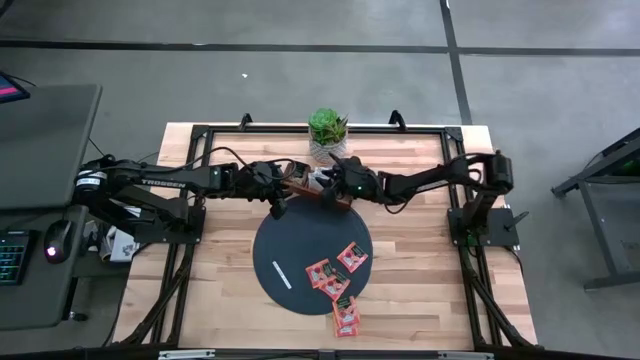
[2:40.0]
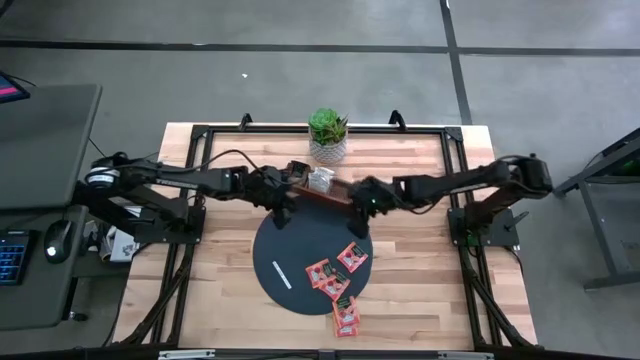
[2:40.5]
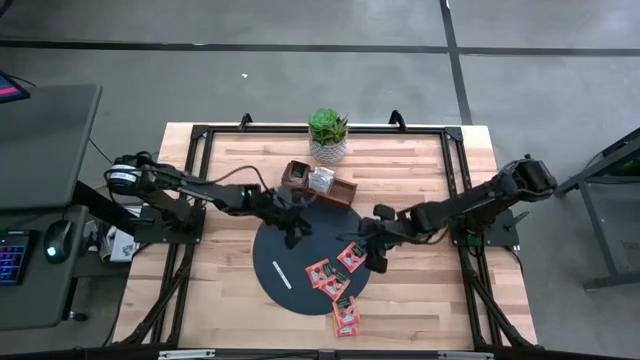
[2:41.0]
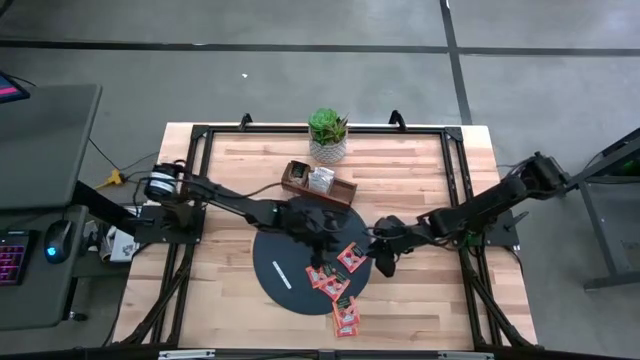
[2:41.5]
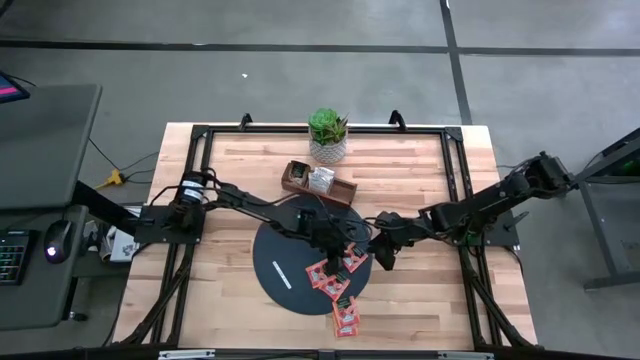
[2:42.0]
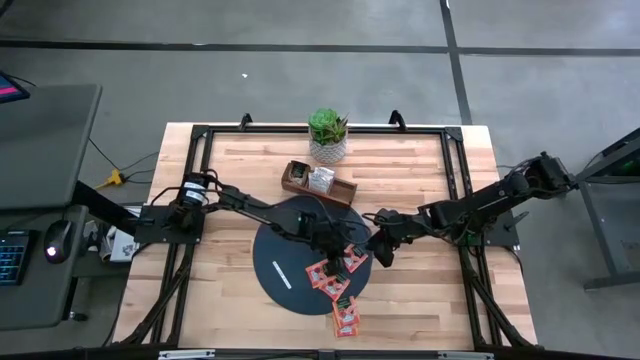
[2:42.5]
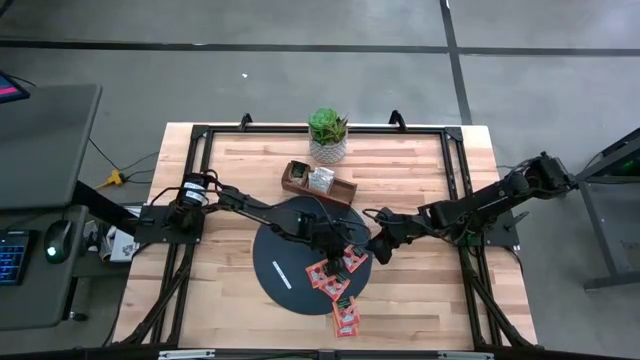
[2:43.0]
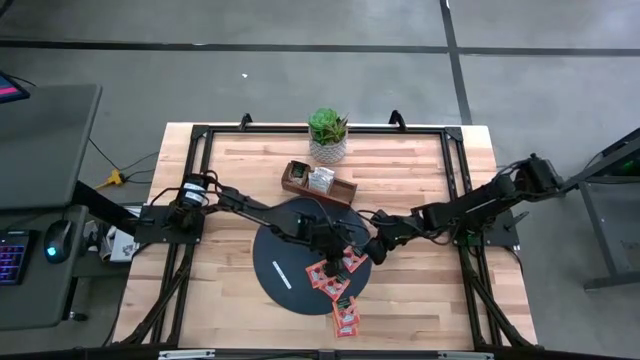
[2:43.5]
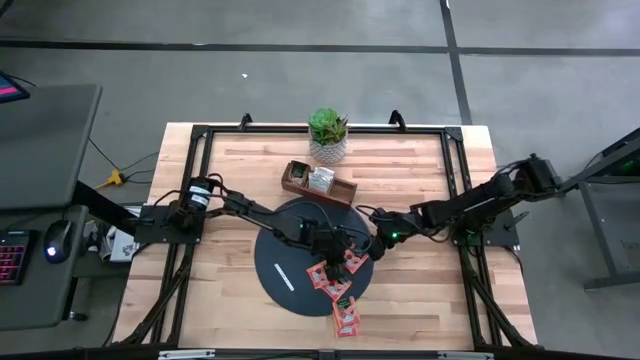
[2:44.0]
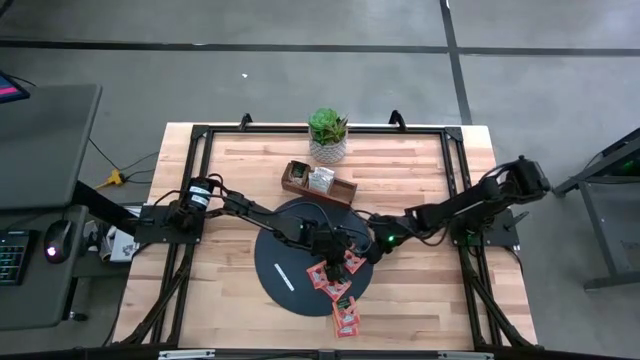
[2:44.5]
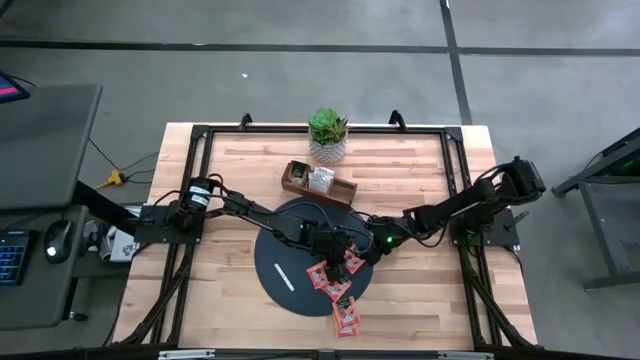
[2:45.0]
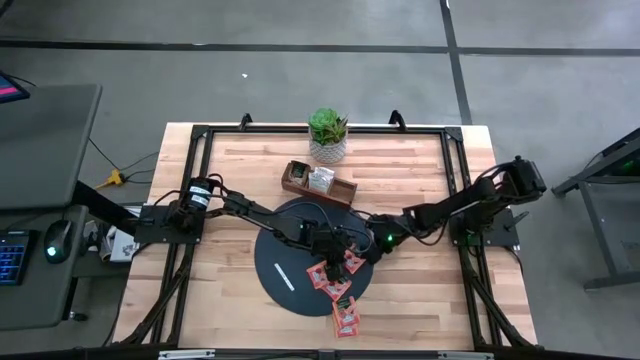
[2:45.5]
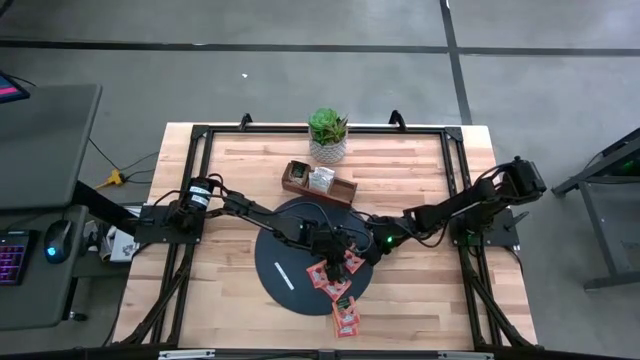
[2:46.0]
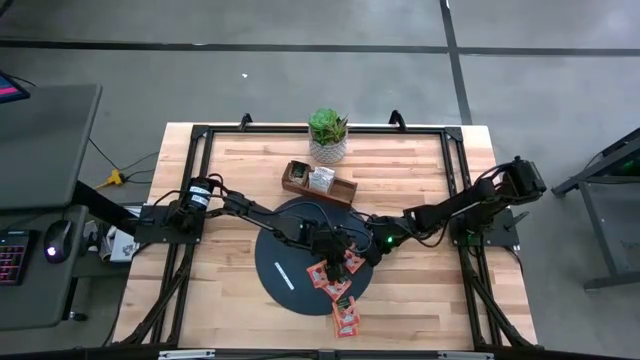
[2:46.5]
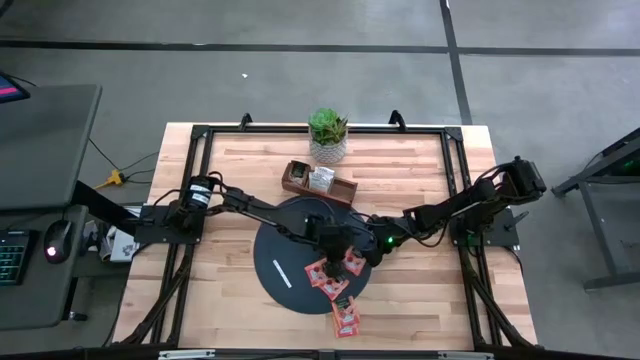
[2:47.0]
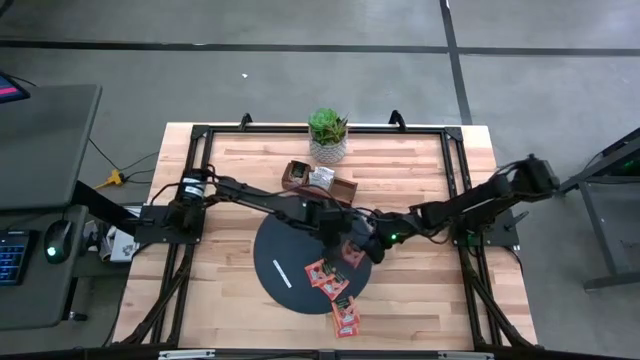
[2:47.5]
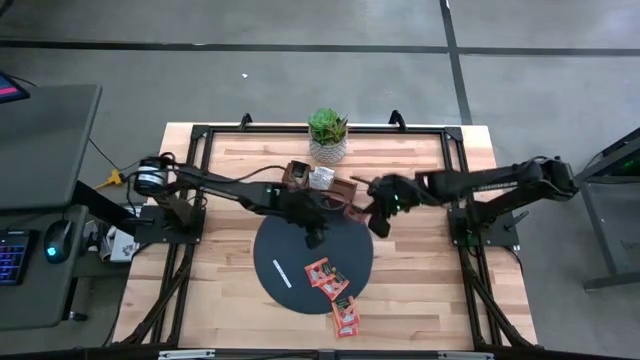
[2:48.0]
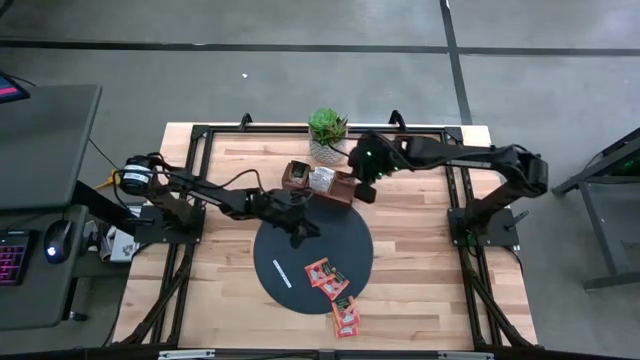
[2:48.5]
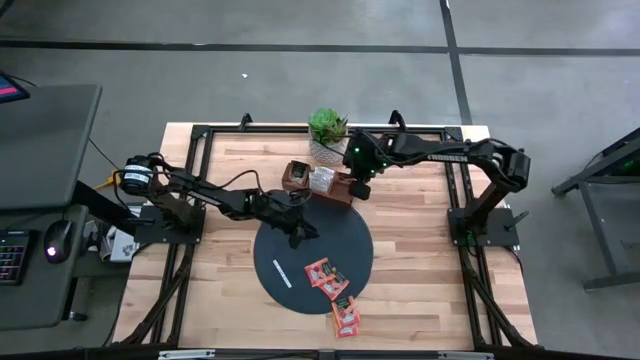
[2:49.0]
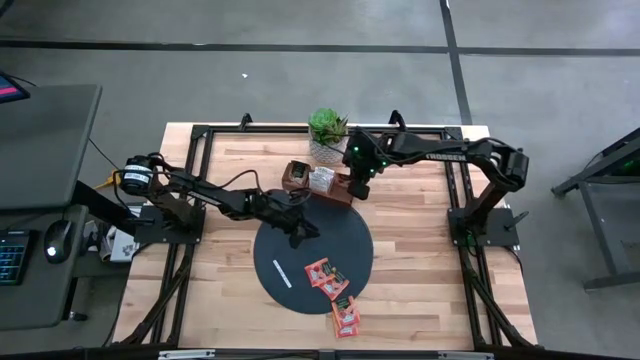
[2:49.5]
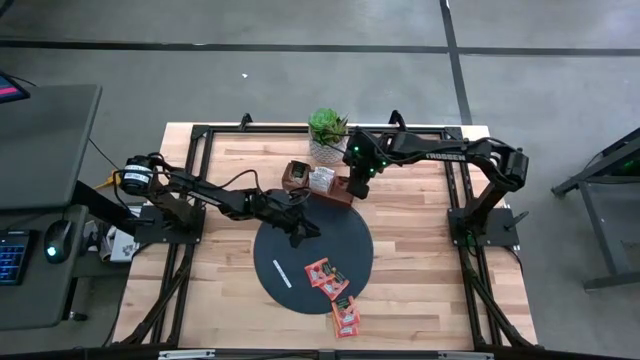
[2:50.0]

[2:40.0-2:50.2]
Task: Pick & Place Tea
Put the orange tea bag into the right section of the wooden organizer

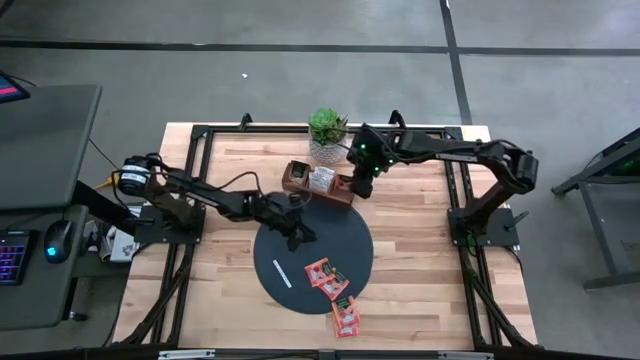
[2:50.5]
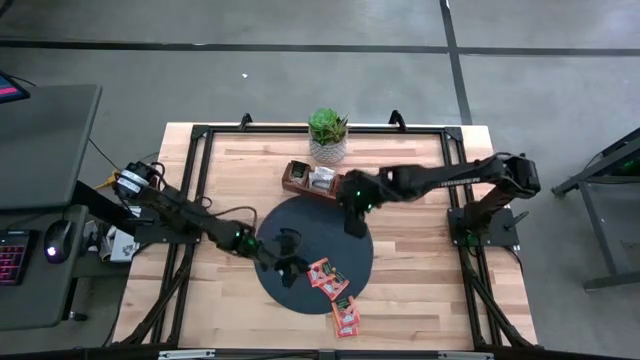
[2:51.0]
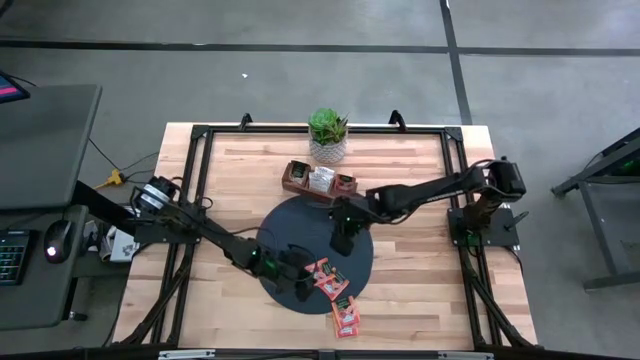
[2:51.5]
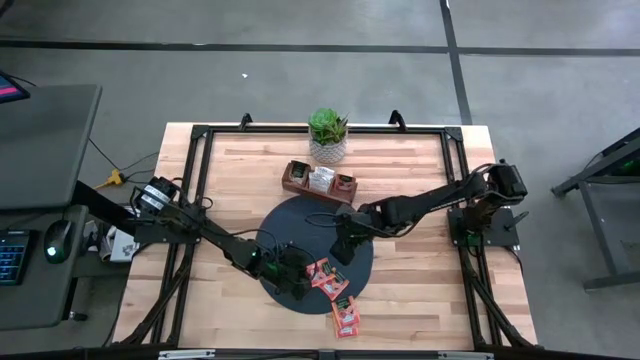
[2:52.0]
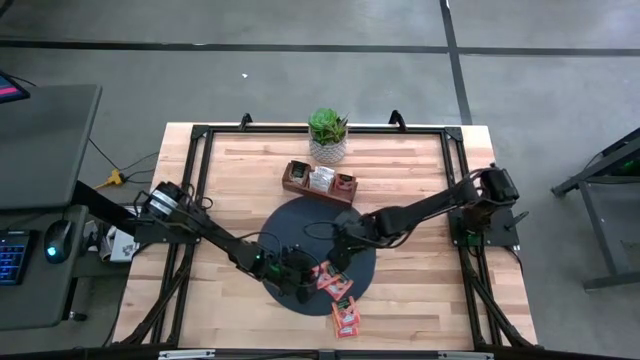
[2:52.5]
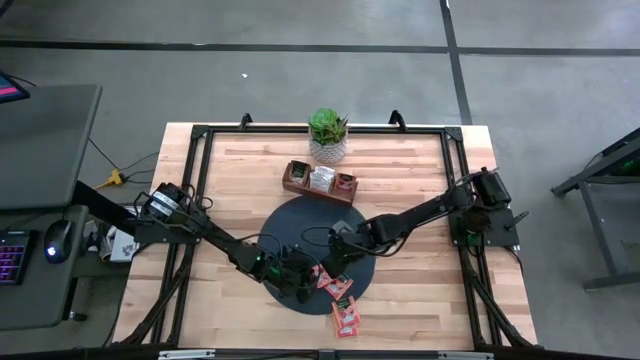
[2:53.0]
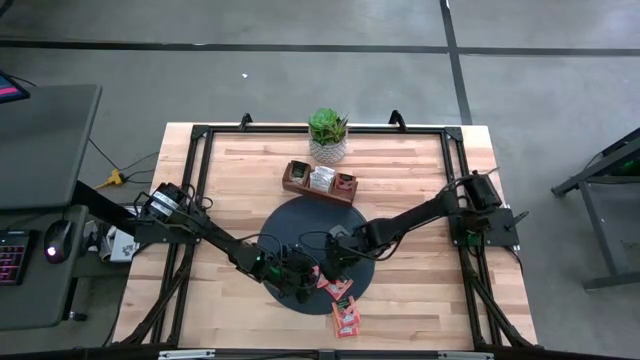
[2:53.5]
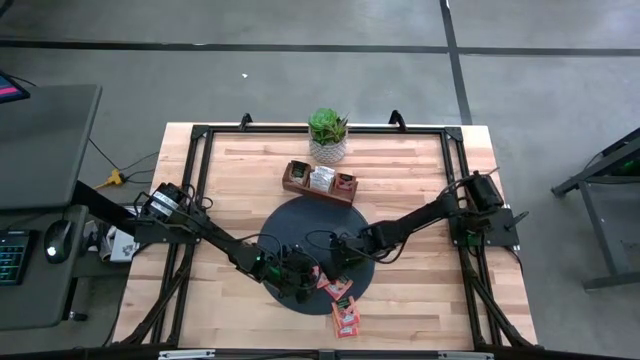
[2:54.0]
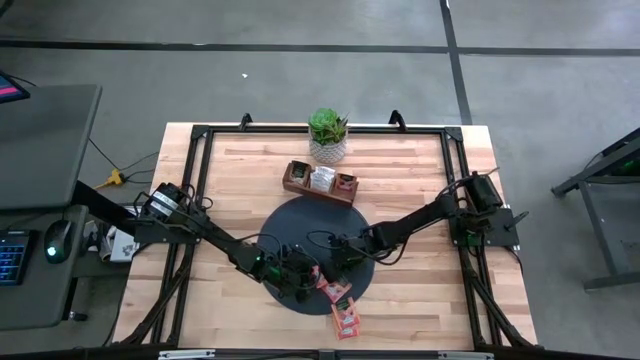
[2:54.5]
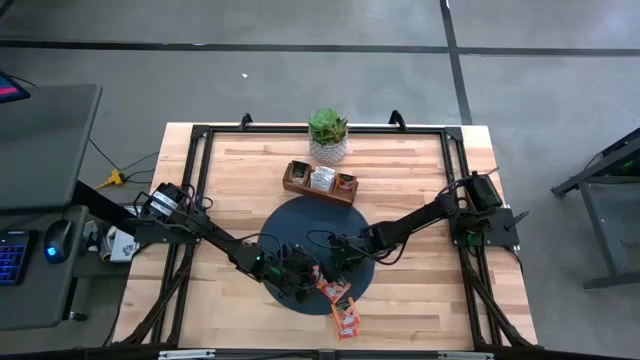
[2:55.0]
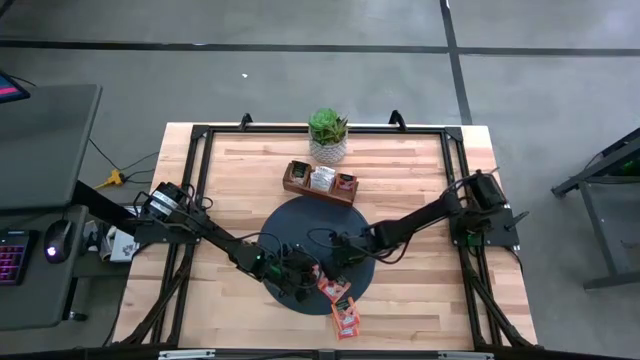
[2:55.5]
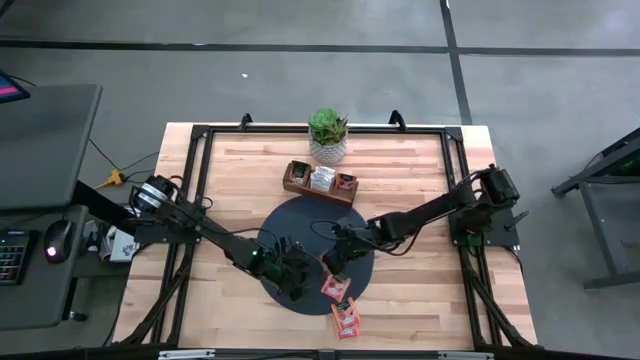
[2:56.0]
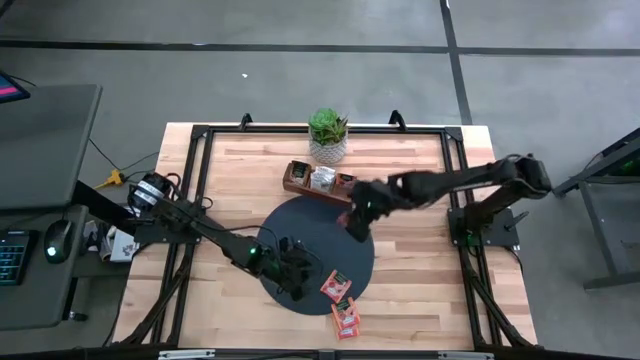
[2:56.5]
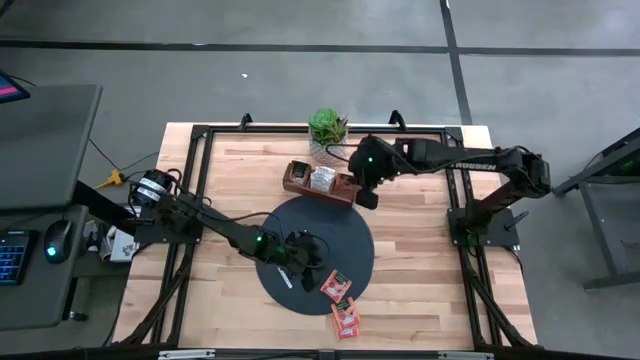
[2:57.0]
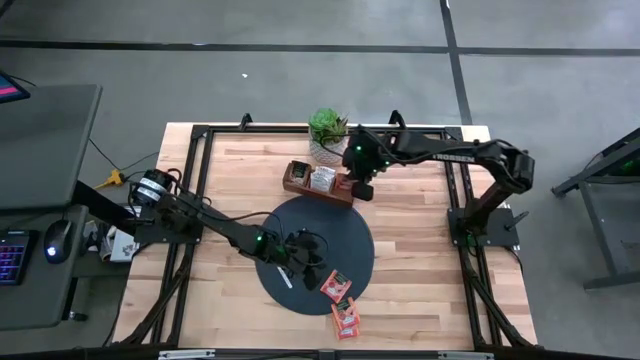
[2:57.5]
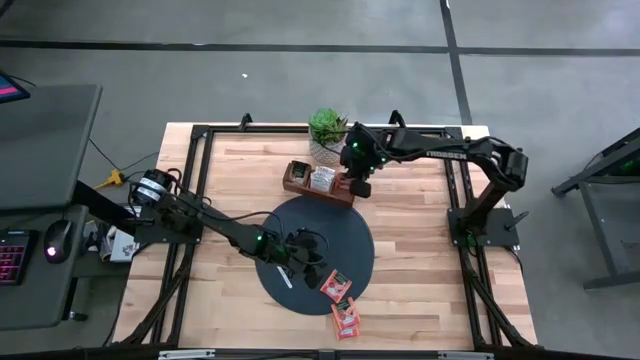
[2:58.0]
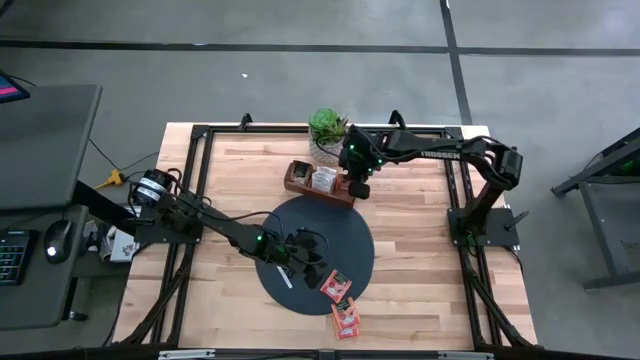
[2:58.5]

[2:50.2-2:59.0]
Put the orange tea bag into the right section of the wooden organizer
